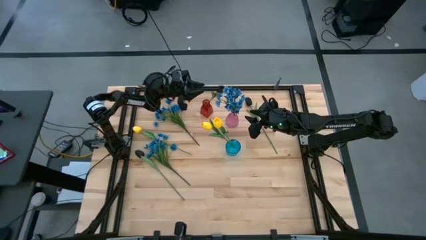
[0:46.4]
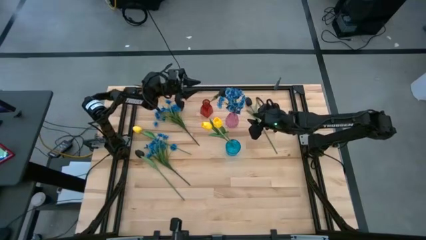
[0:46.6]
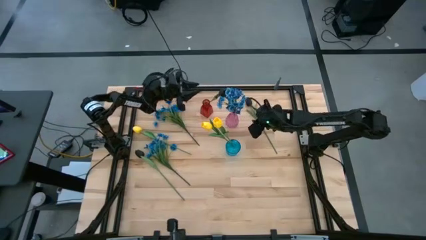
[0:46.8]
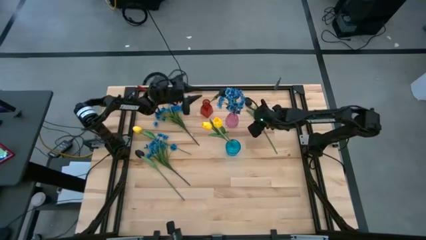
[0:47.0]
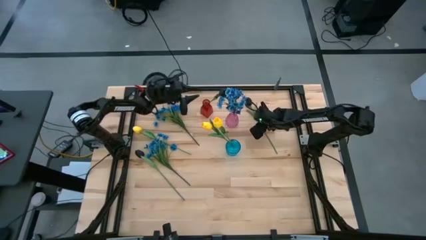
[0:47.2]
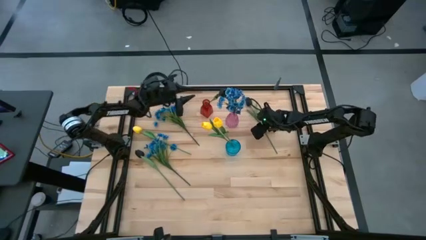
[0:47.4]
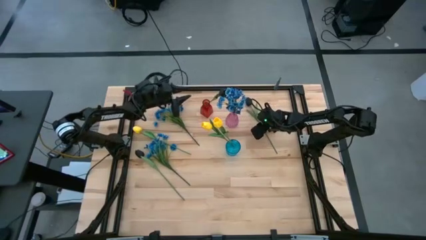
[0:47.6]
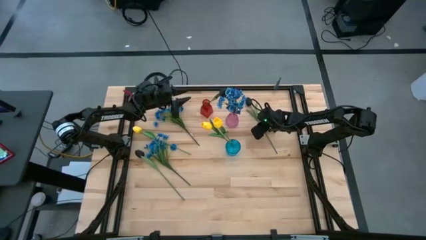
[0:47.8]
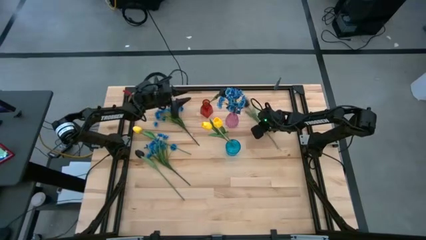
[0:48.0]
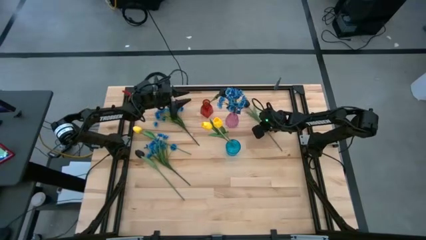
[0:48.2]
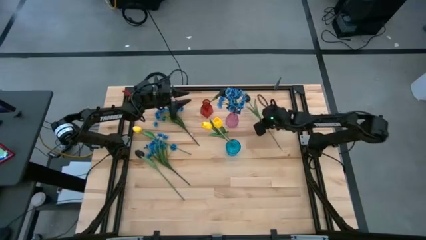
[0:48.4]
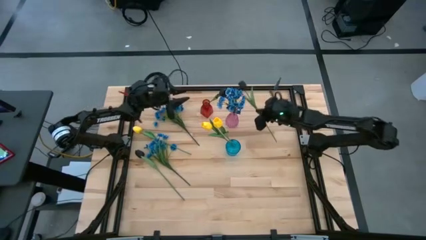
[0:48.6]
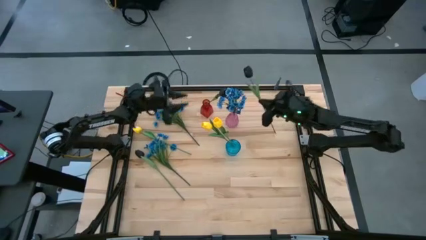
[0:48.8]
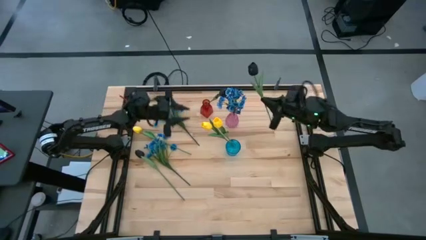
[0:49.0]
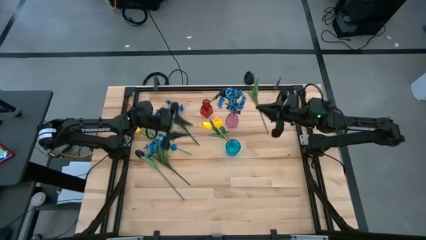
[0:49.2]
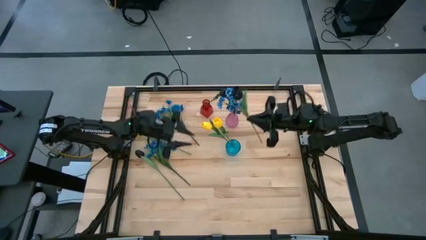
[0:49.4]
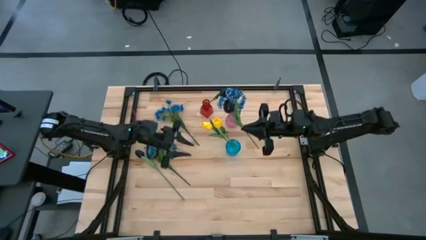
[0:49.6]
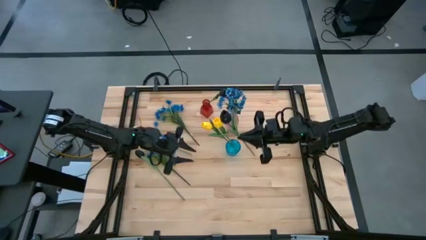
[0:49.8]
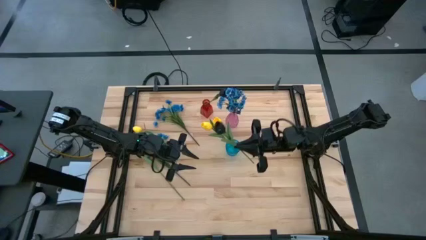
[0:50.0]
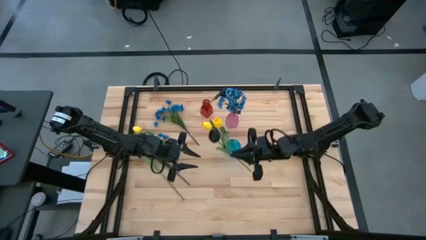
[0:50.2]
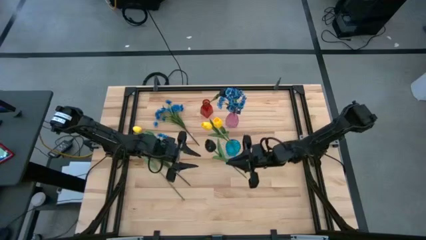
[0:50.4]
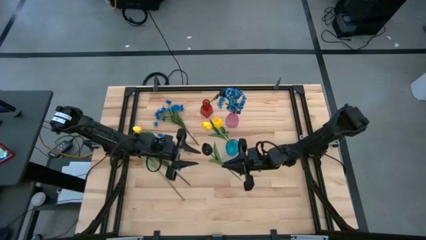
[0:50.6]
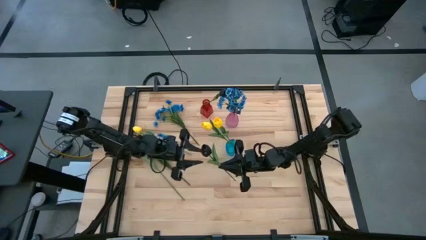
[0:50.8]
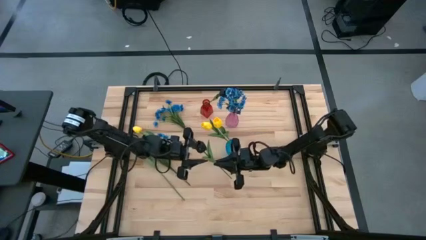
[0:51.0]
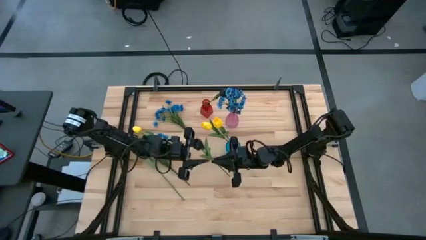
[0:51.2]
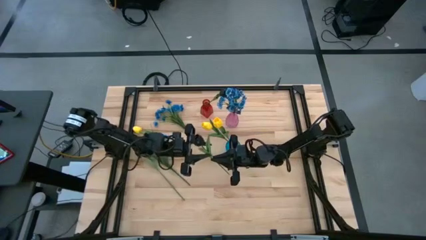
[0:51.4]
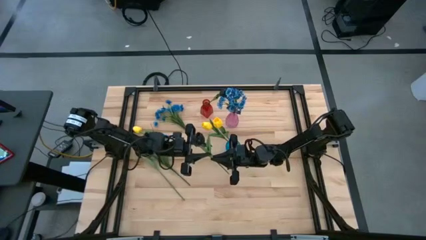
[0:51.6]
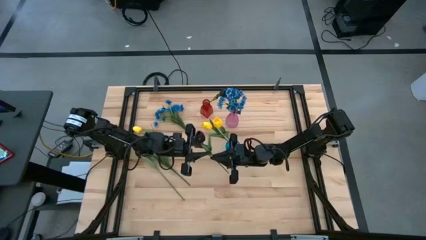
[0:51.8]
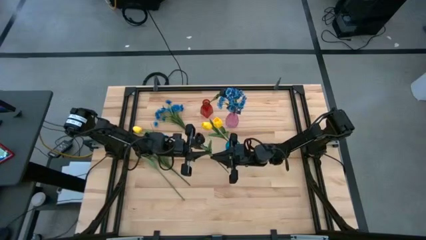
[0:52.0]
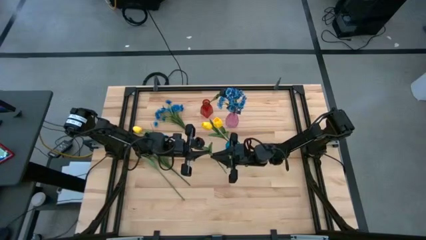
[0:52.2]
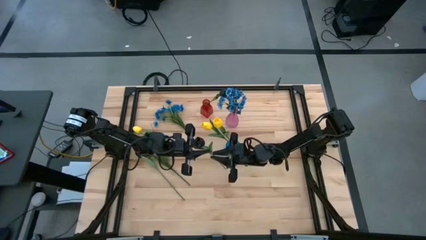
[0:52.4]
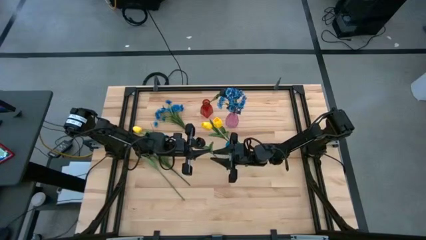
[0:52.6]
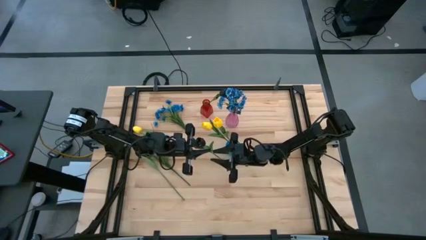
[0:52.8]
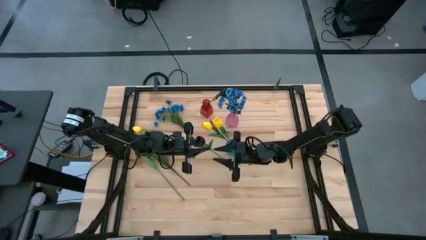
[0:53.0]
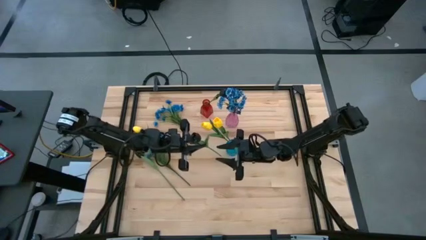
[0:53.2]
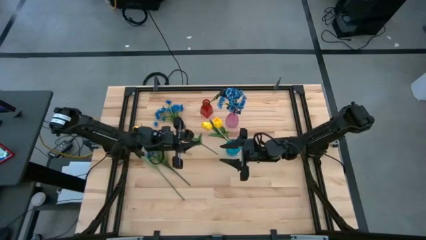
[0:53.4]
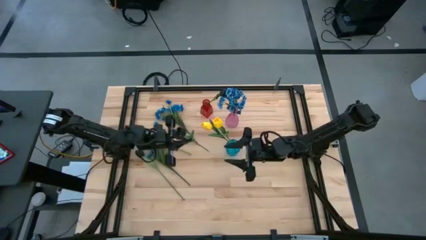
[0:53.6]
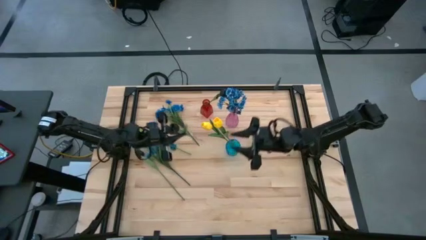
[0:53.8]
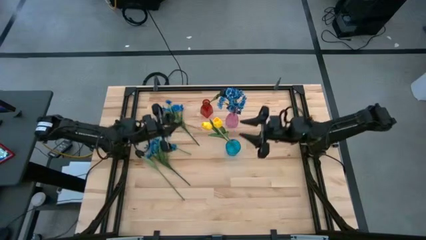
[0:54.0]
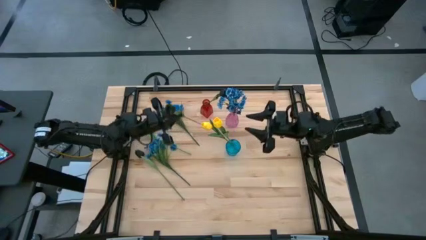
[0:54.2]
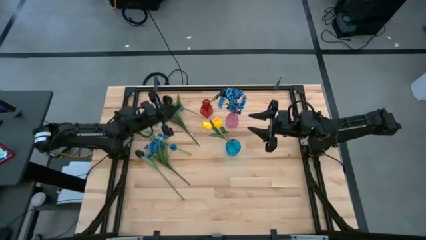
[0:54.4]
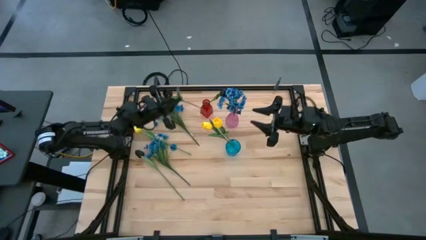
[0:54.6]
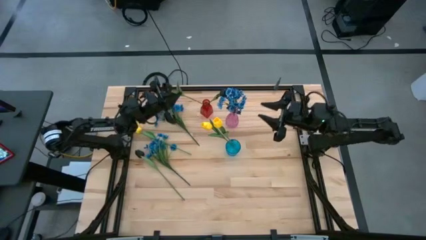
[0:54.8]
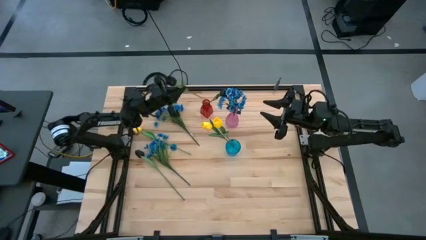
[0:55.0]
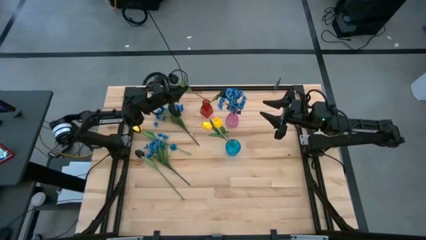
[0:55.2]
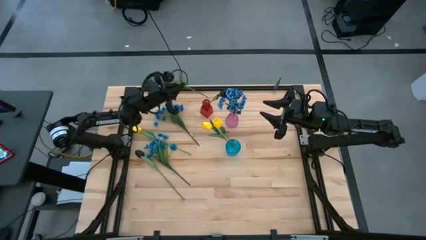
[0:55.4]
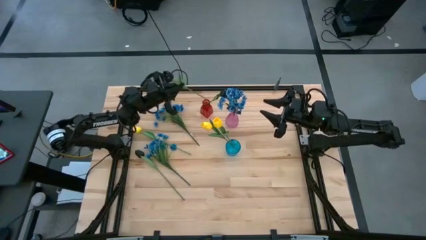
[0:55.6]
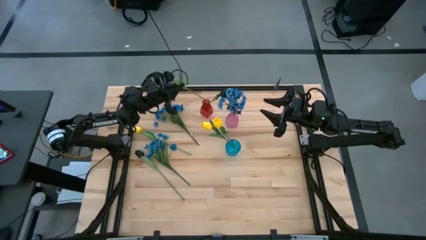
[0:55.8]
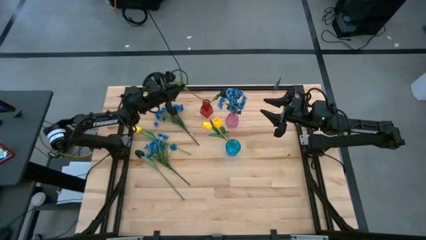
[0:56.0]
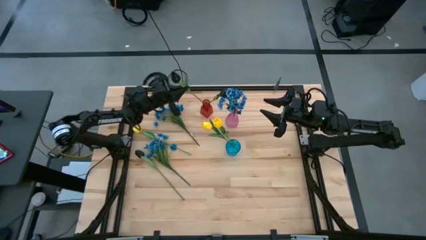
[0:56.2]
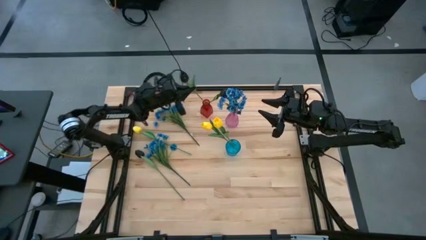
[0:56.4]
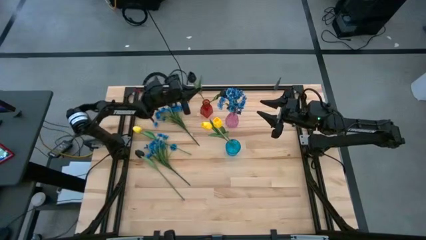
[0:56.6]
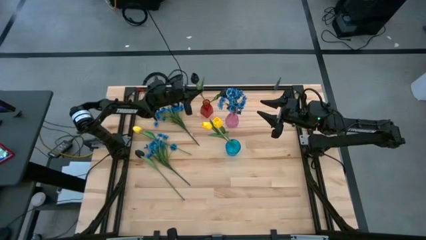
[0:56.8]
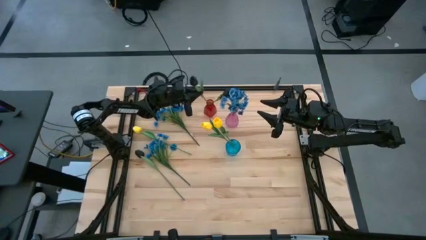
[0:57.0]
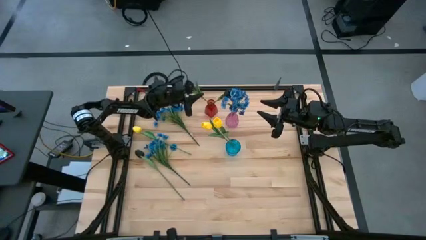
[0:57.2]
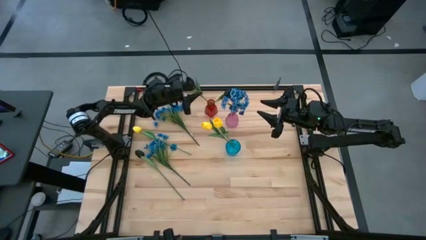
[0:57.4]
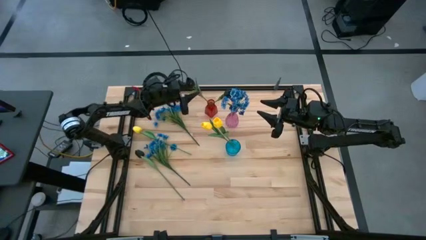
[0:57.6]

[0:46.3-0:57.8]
Task: Sort flowers into vase by color
Put the black flower into the red vase

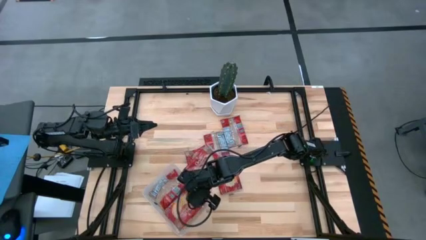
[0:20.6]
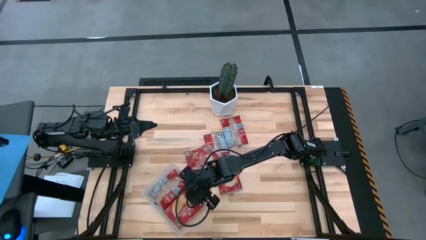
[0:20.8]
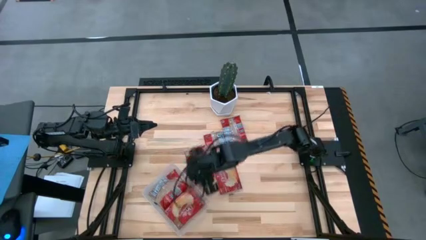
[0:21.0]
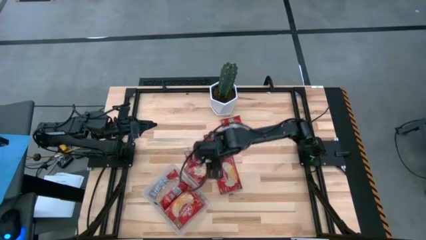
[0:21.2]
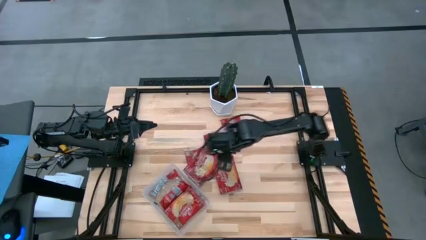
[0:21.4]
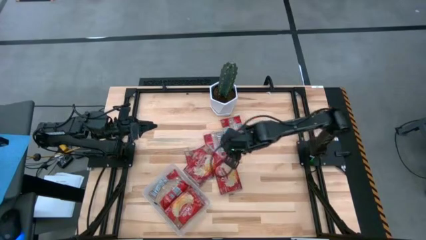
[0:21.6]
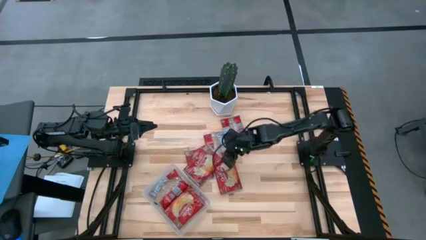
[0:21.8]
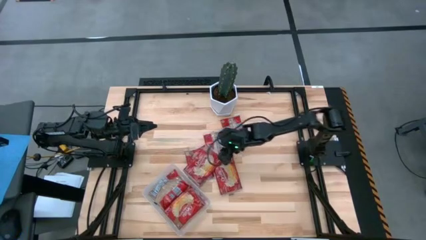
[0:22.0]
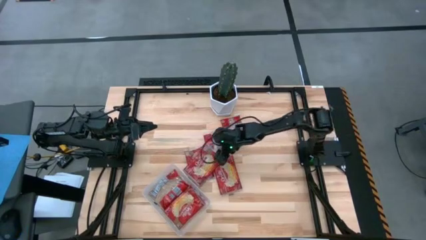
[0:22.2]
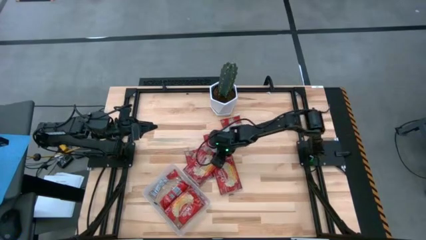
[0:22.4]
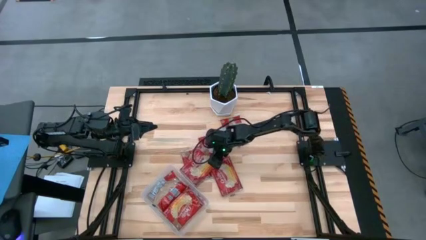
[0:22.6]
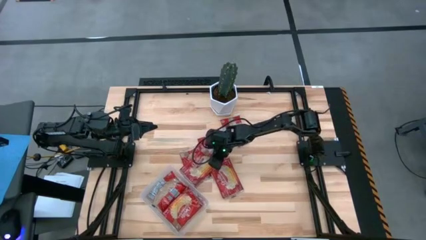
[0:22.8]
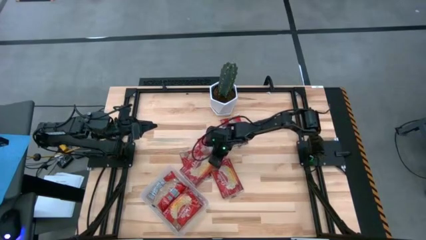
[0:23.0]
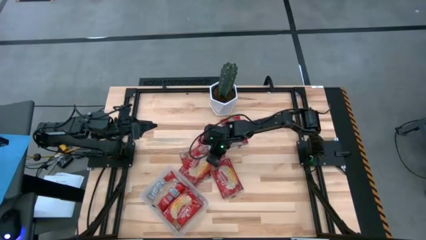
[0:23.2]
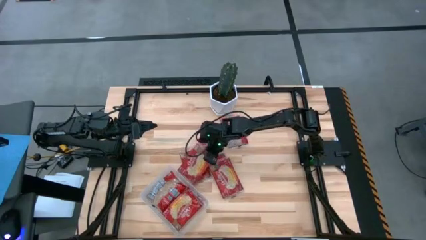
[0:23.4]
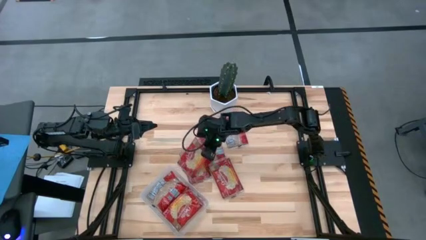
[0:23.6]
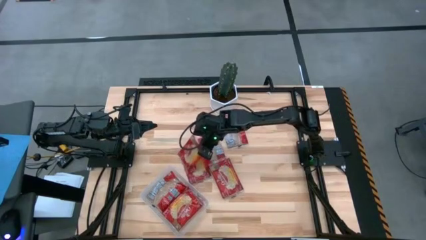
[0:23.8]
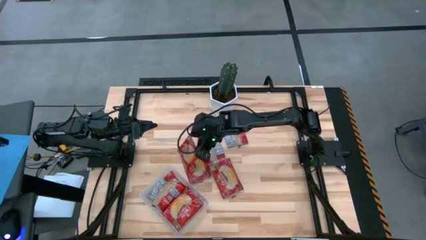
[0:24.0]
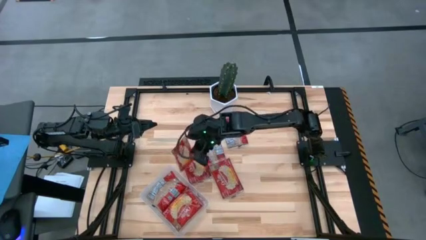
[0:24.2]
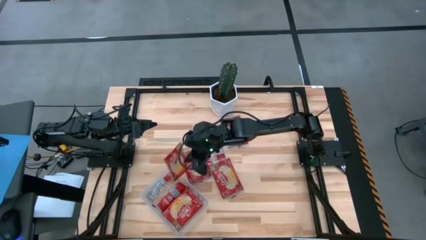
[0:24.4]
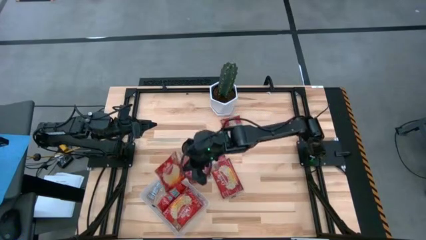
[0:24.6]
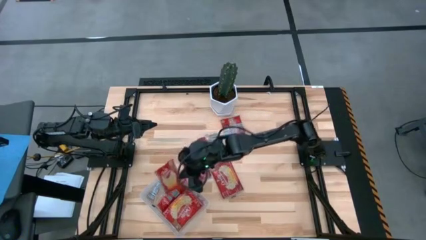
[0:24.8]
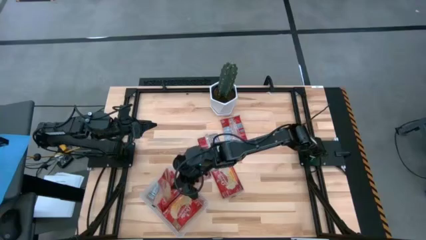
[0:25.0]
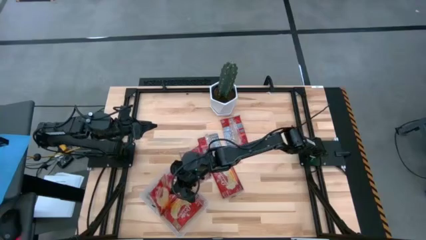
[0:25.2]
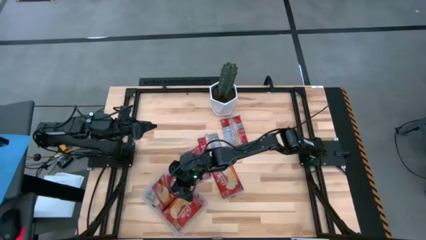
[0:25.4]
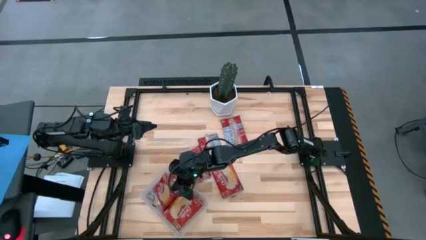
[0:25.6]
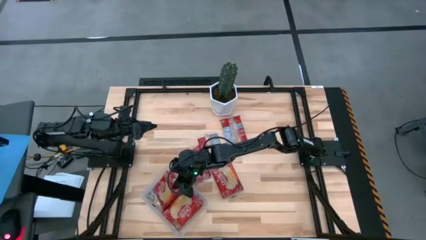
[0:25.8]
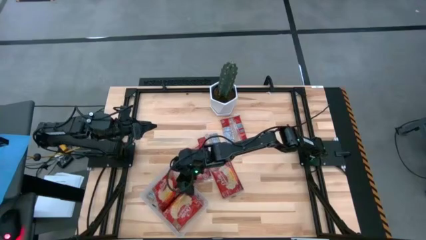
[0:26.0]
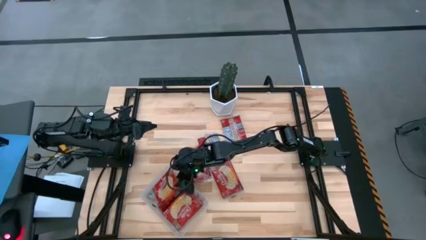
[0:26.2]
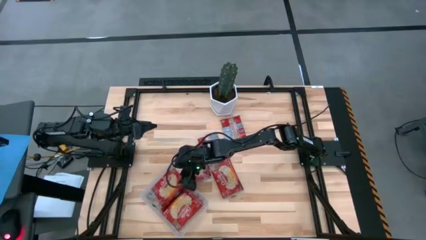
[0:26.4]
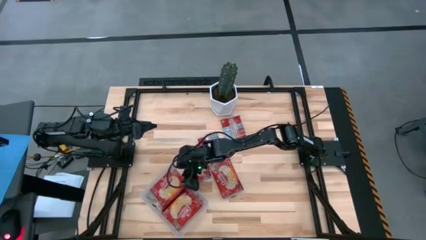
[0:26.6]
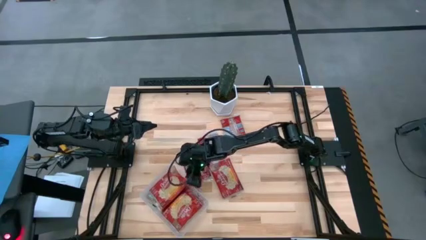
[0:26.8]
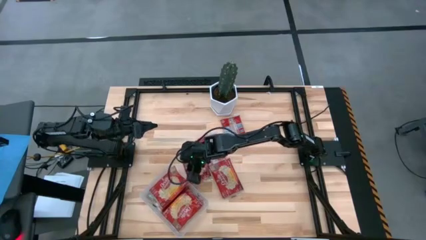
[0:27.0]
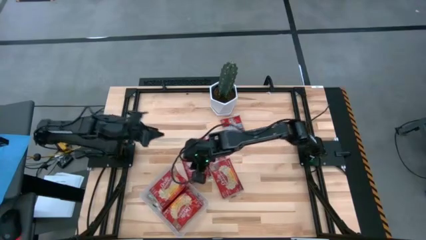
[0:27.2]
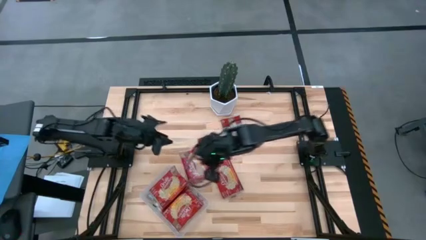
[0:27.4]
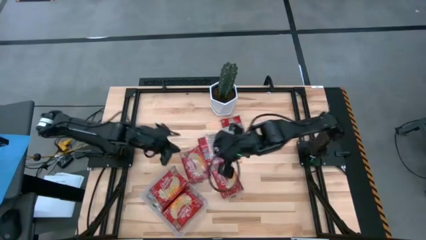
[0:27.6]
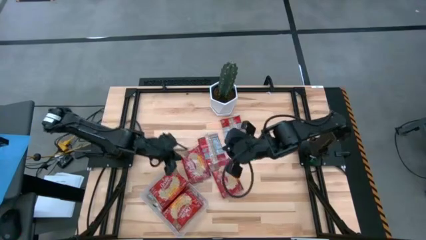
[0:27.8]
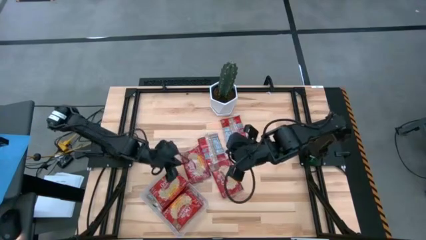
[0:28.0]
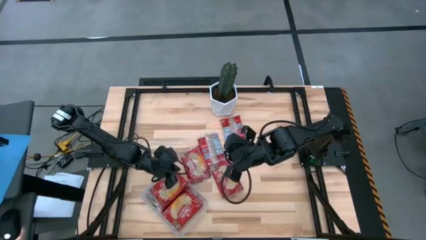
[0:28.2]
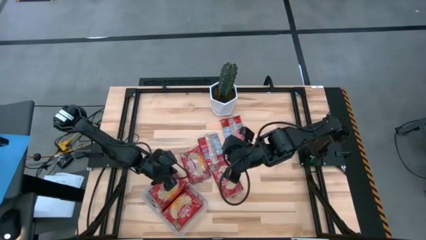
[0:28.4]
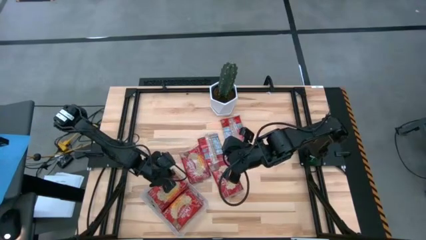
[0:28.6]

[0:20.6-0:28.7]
Task: Sort popcorn bags into baskets
Put the red popcorn bag into the transparent bin
